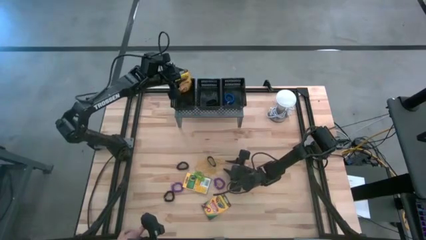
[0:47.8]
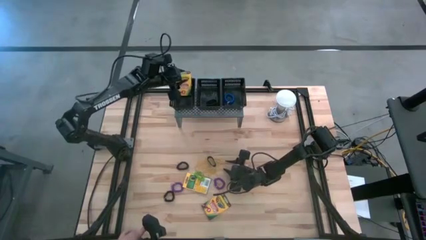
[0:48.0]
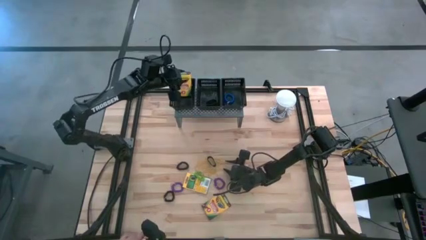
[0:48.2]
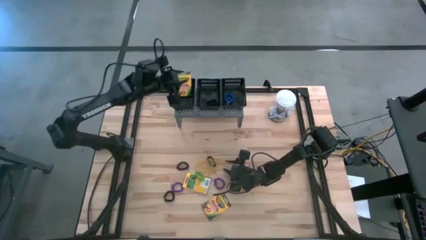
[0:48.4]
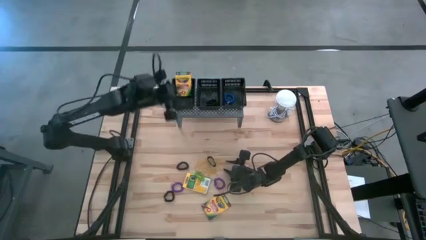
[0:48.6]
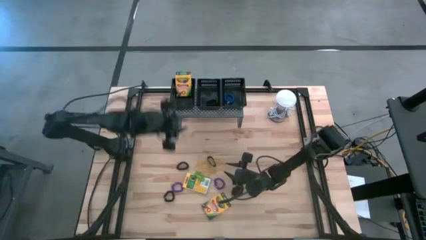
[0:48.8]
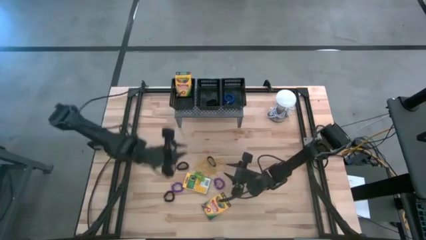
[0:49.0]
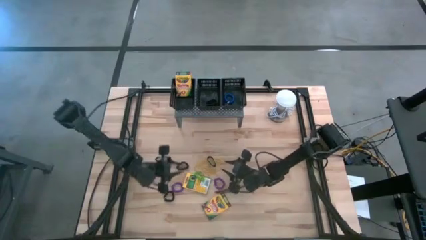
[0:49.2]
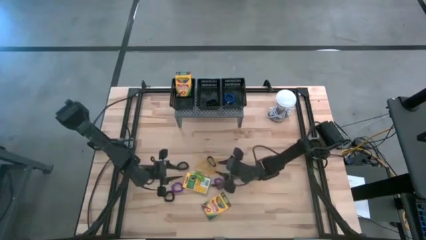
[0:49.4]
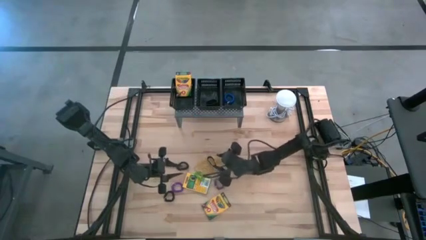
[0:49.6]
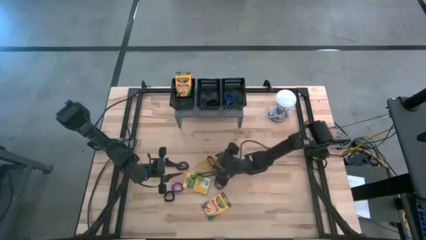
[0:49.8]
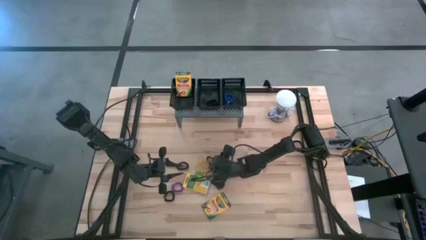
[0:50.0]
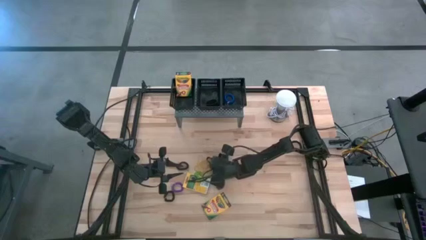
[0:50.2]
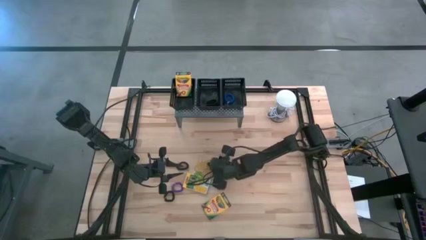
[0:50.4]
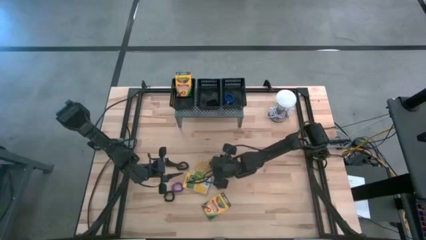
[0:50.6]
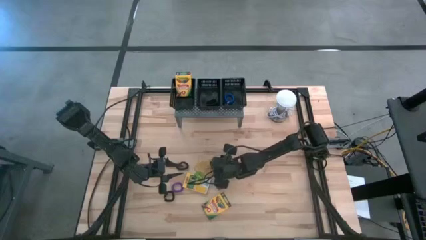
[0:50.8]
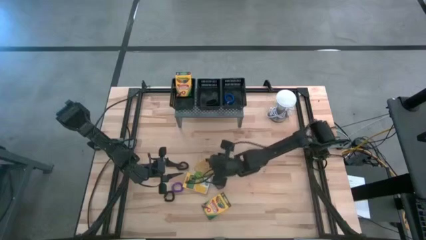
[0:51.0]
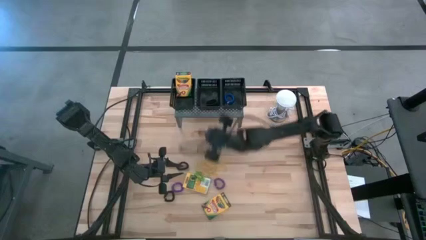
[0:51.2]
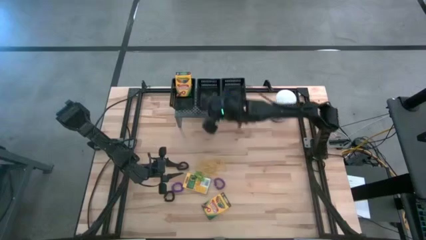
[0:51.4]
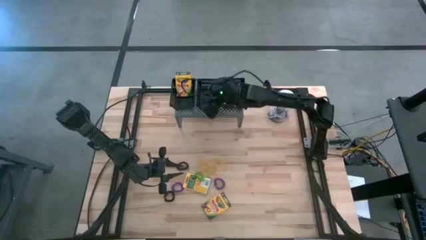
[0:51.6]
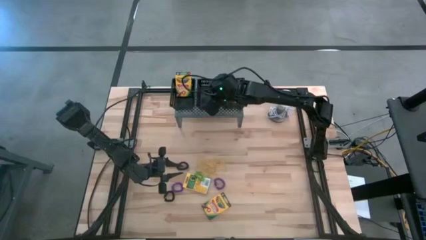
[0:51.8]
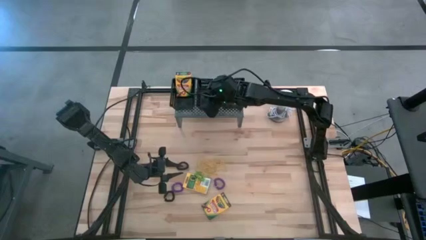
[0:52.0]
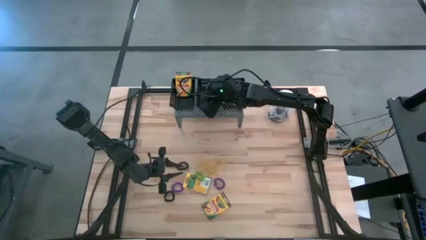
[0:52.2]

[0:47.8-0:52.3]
Task: Pick & Place Office Desk Supplies
Put the black rubber band in the middle black bin on the shelf

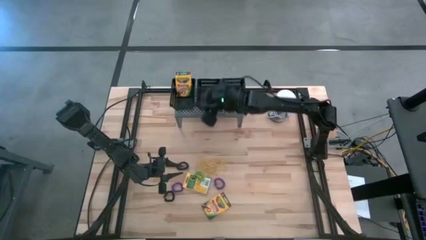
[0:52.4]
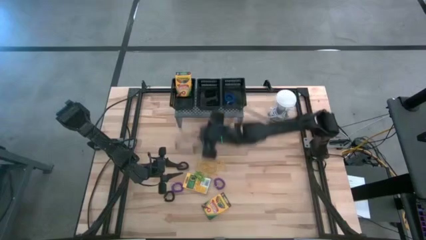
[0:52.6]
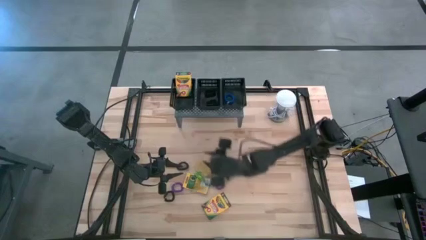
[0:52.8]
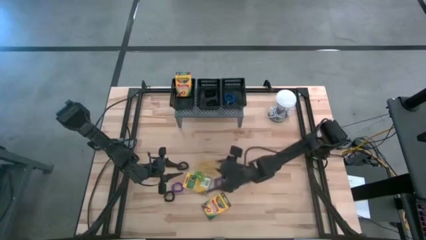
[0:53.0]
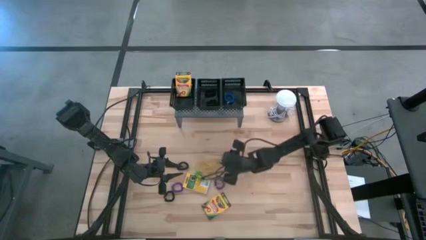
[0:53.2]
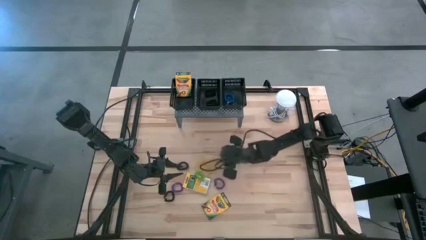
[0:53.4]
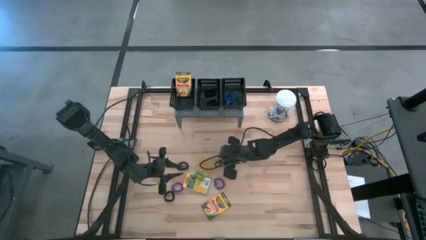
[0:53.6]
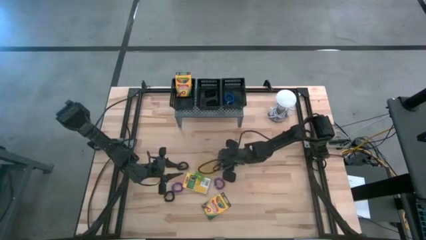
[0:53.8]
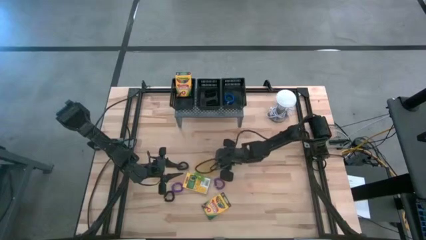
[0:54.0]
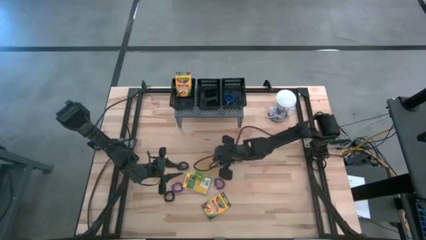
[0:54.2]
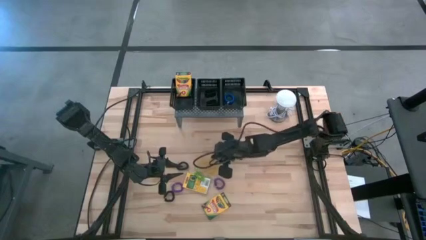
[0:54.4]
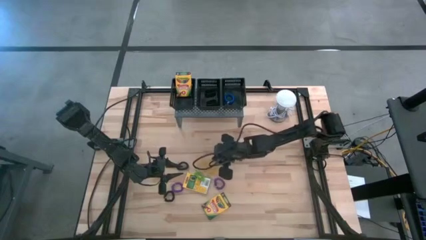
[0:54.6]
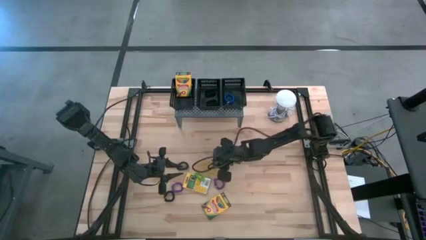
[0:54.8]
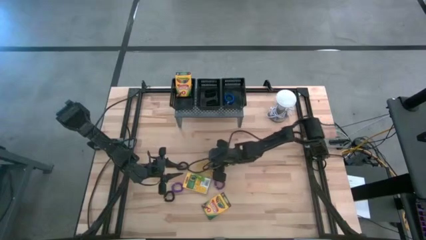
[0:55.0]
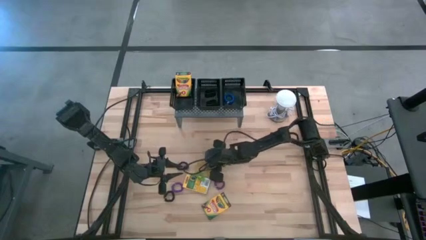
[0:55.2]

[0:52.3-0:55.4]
Put the yellow rubber band in the middle black bin on the shelf

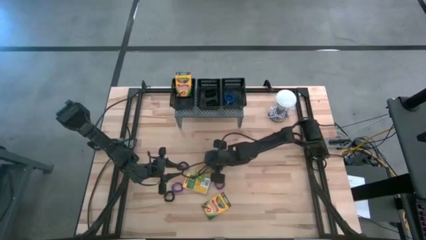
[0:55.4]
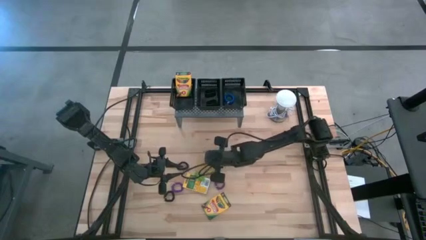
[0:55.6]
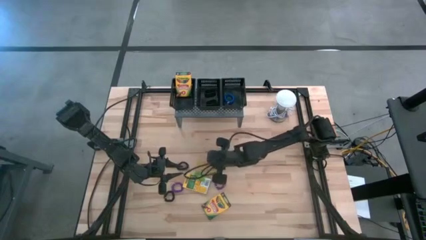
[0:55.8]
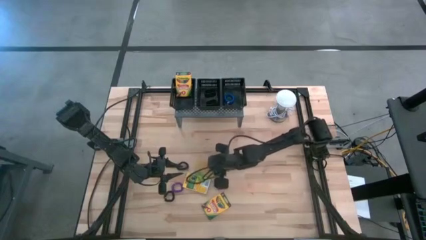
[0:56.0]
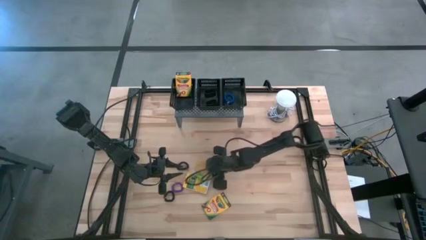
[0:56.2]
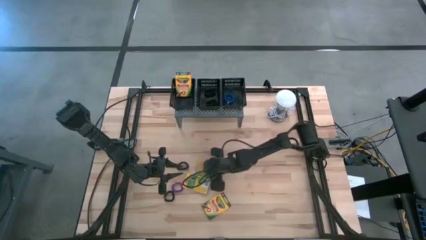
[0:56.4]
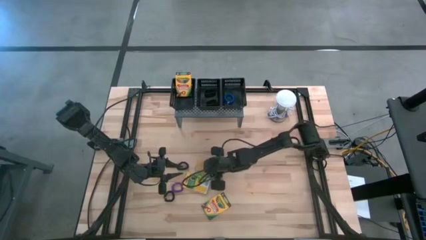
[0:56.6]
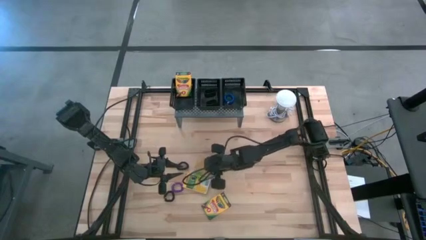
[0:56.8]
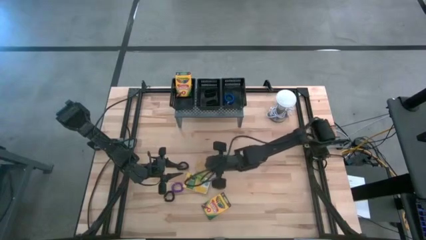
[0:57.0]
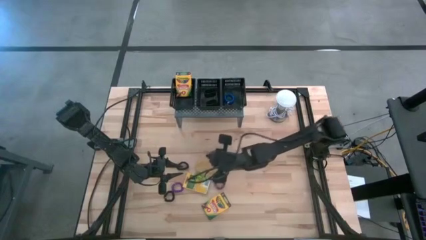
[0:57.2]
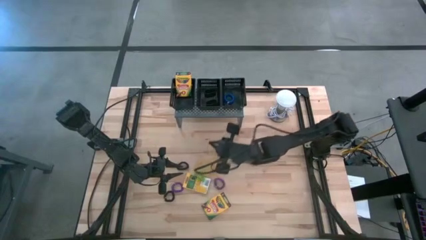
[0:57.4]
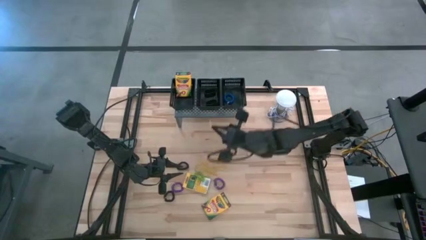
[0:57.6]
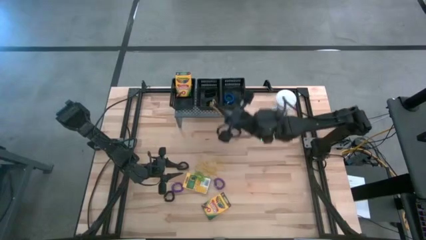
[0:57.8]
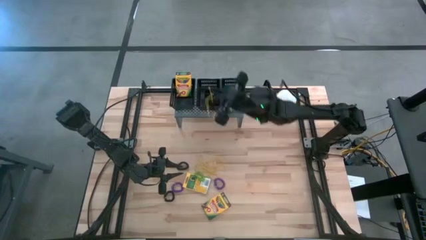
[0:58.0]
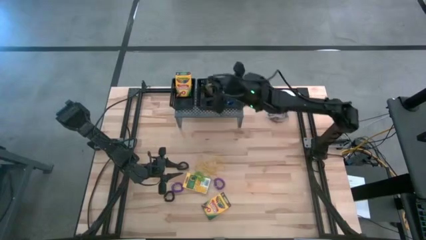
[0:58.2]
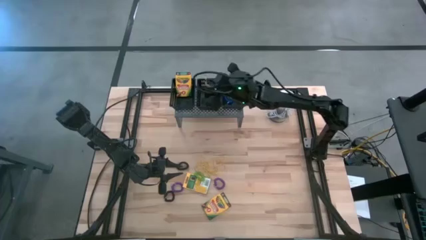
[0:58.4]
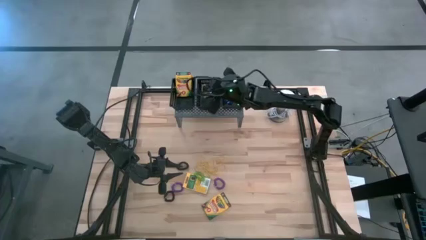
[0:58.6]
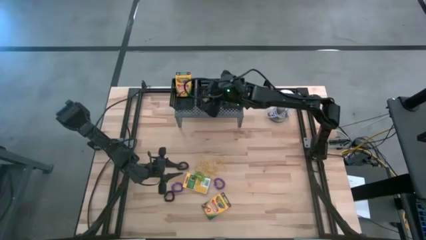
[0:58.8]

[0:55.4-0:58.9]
Put the yellow rubber band in the middle black bin on the shelf

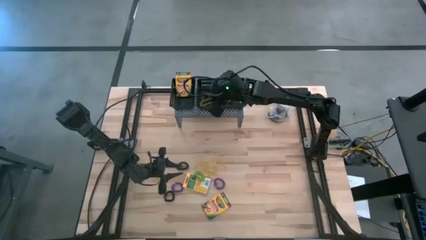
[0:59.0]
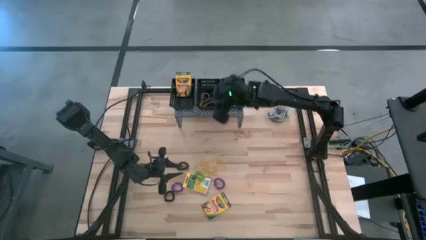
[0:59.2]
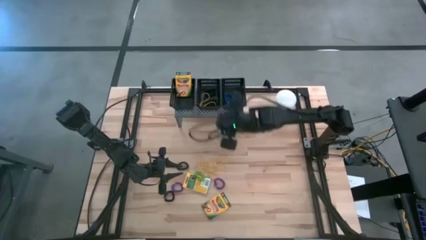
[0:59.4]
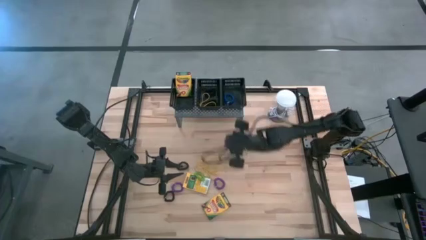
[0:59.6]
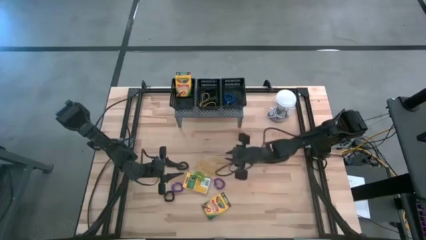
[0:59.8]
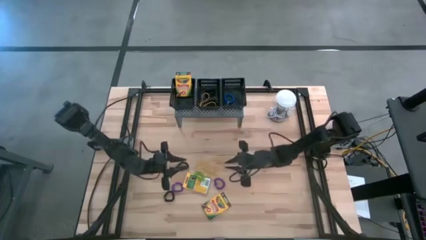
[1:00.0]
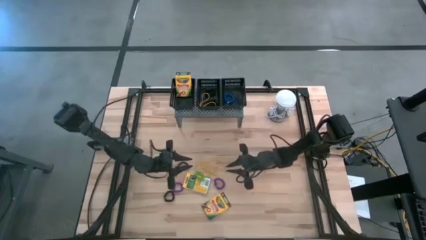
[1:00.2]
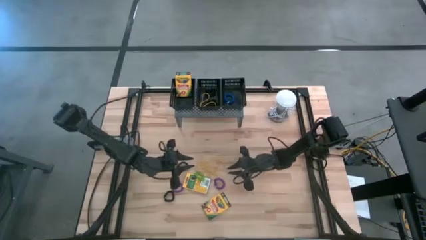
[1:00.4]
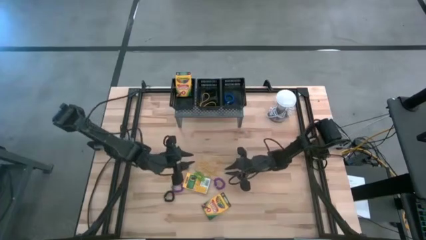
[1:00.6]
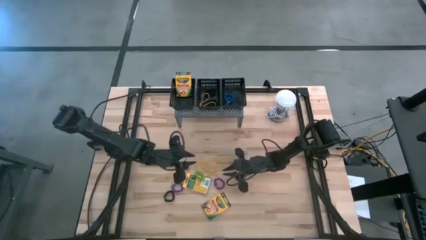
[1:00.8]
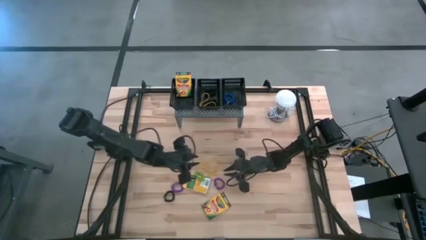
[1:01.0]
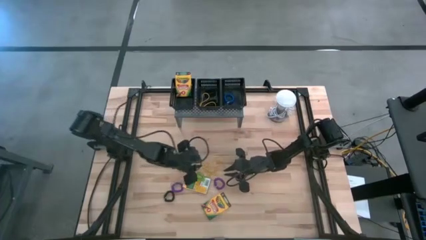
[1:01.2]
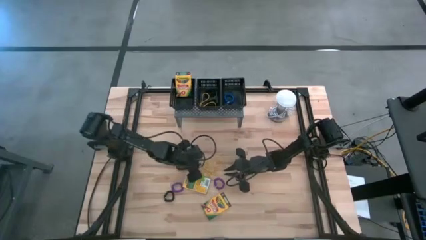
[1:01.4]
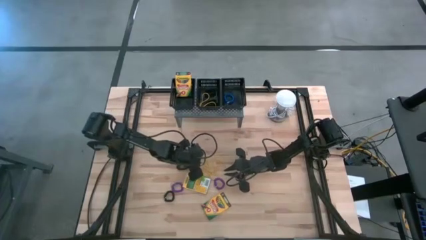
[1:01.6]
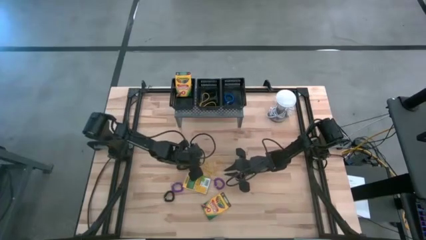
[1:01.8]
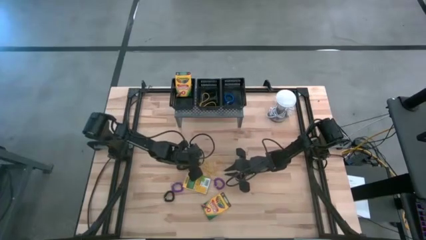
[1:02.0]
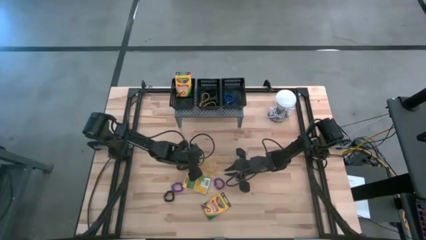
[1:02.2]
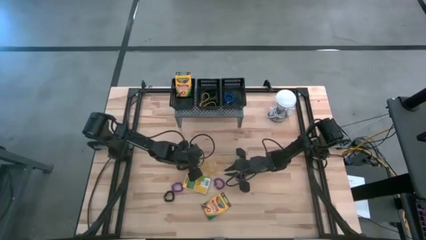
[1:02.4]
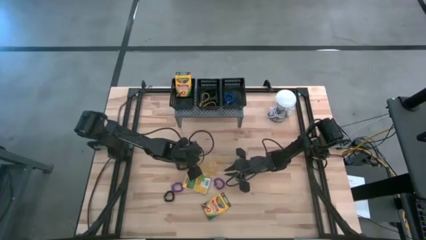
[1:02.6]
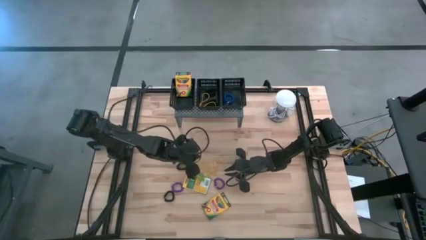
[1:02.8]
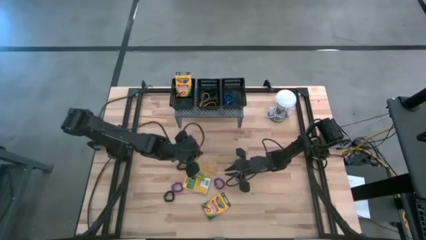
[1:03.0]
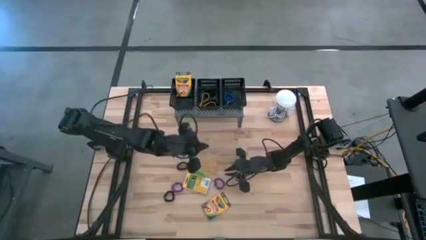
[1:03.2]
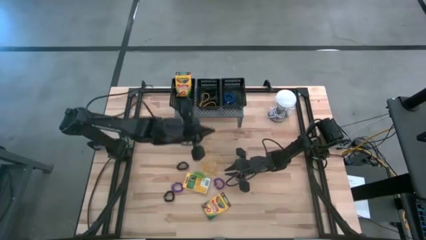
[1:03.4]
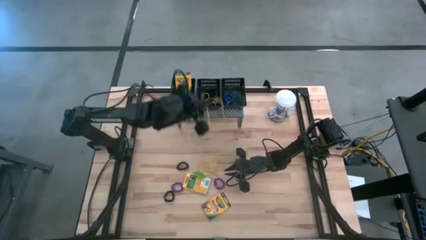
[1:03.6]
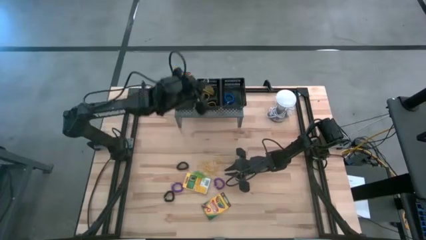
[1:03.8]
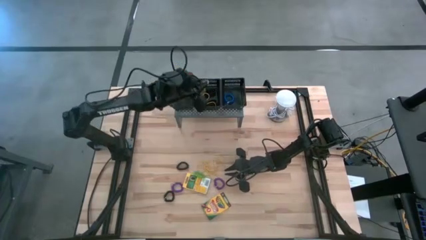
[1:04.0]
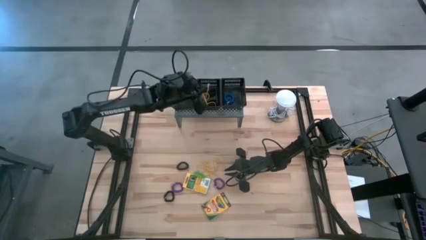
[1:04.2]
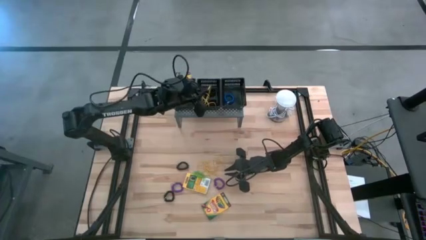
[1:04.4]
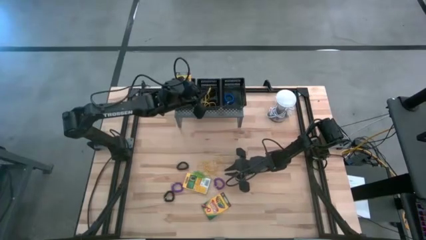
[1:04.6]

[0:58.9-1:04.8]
Put the yellow rubber band in the middle black bin on the shelf
